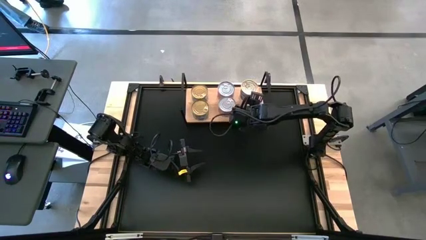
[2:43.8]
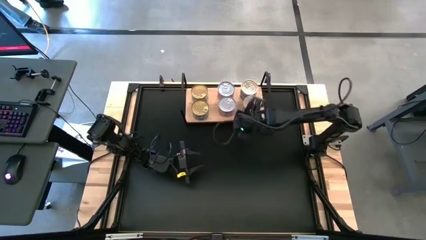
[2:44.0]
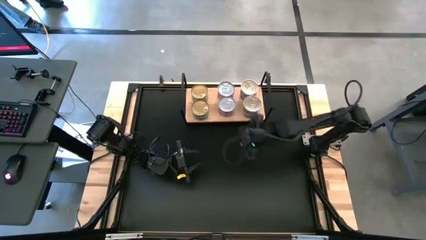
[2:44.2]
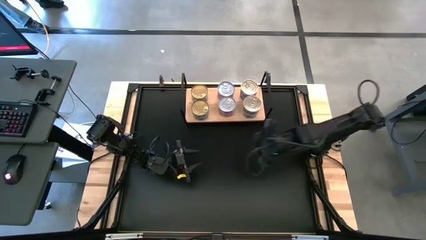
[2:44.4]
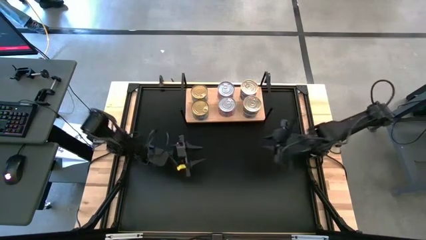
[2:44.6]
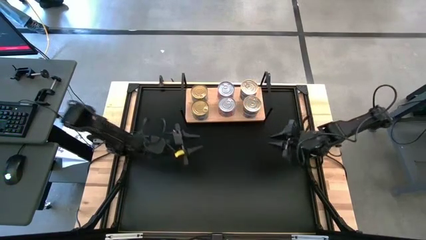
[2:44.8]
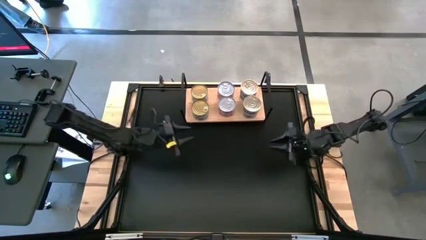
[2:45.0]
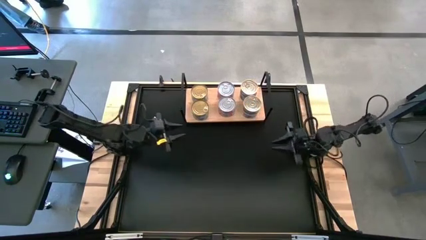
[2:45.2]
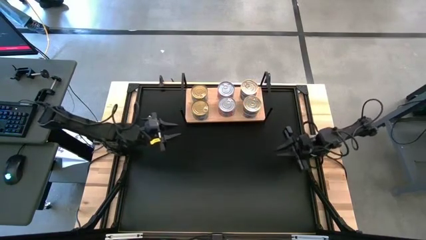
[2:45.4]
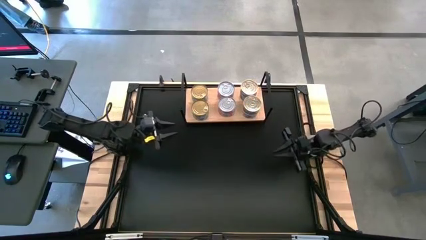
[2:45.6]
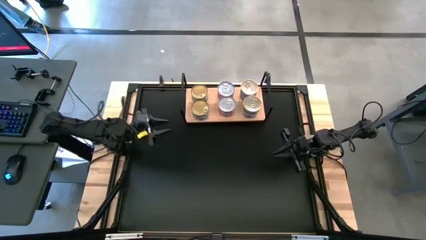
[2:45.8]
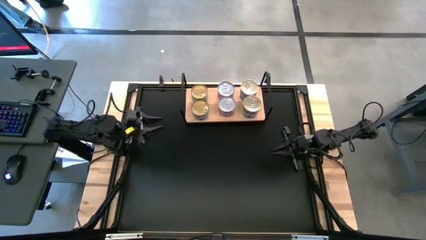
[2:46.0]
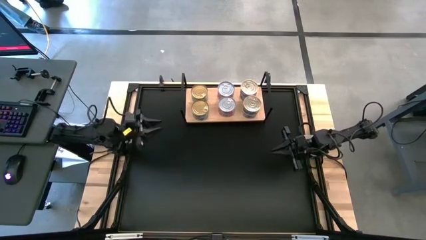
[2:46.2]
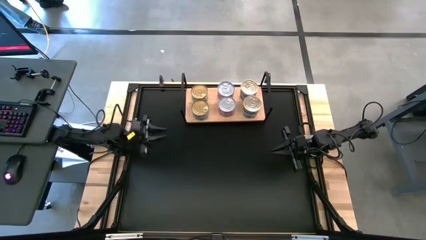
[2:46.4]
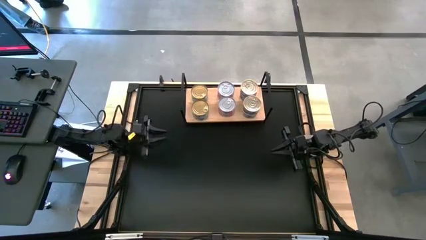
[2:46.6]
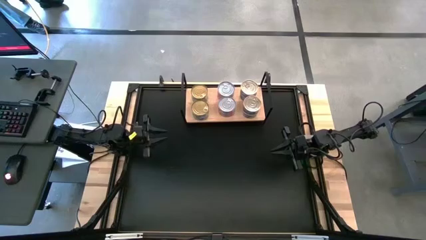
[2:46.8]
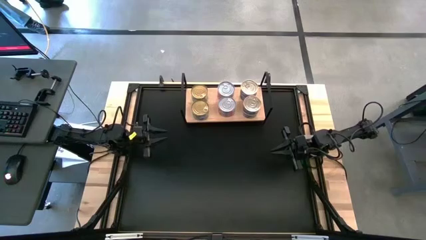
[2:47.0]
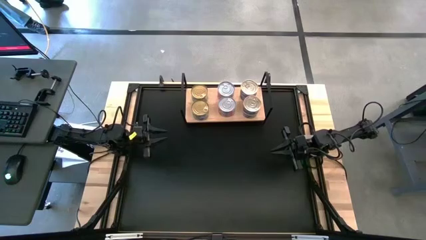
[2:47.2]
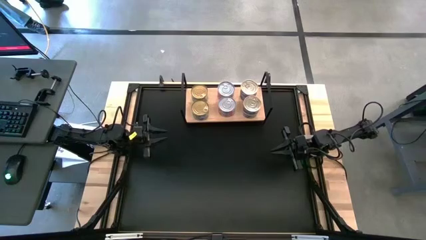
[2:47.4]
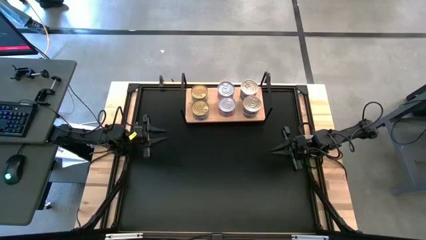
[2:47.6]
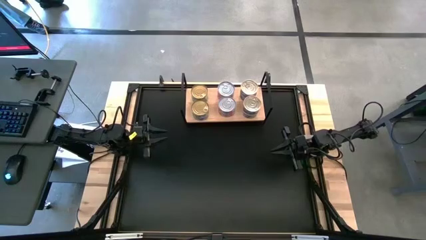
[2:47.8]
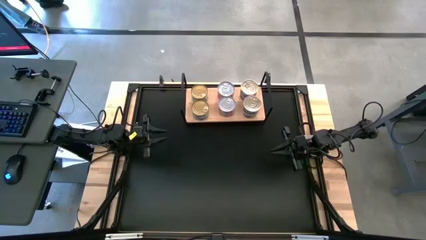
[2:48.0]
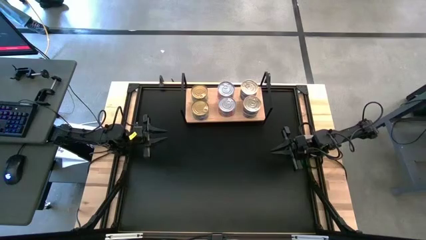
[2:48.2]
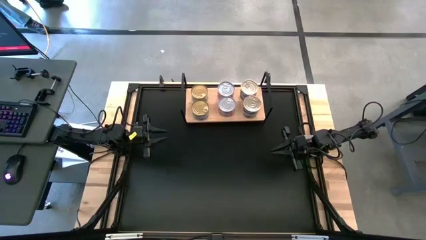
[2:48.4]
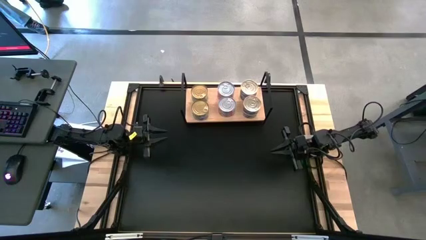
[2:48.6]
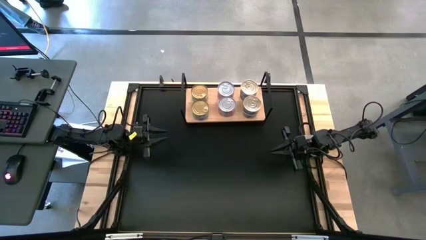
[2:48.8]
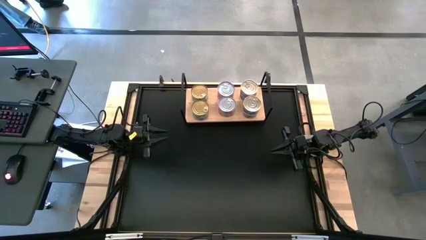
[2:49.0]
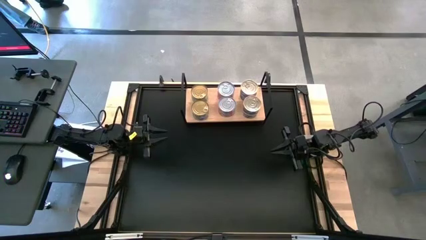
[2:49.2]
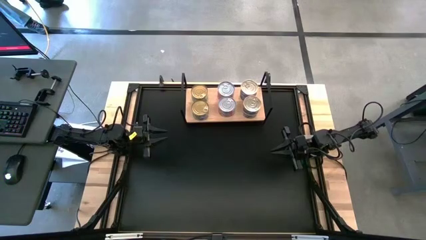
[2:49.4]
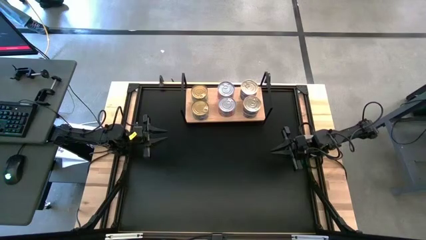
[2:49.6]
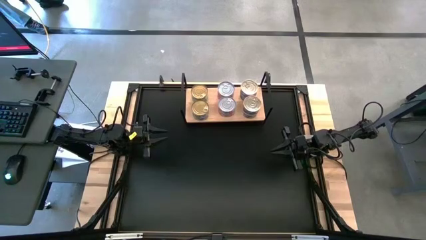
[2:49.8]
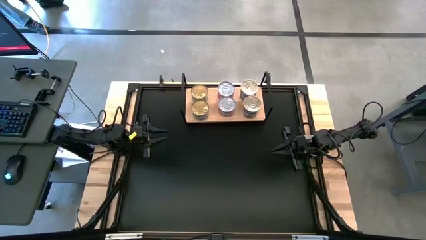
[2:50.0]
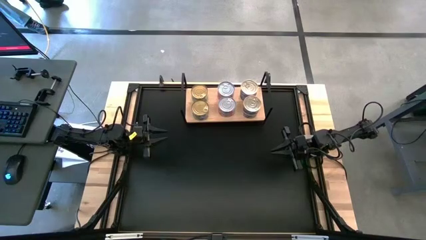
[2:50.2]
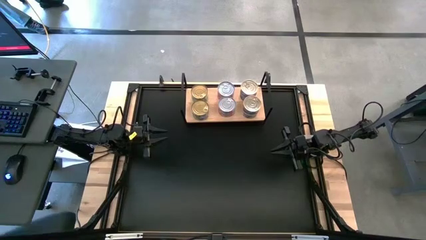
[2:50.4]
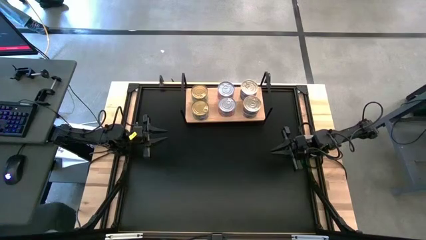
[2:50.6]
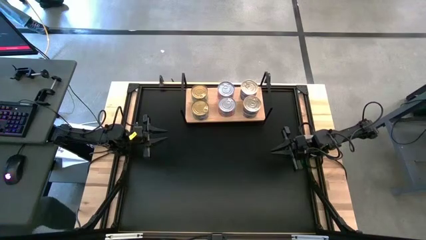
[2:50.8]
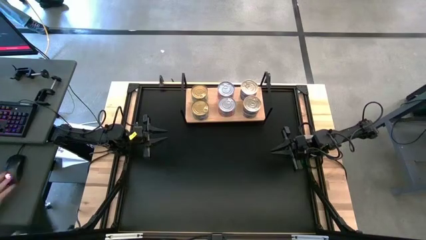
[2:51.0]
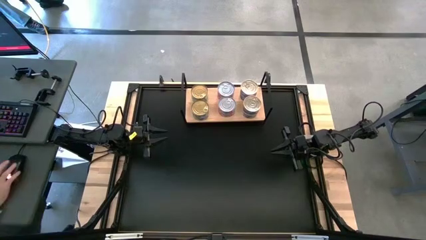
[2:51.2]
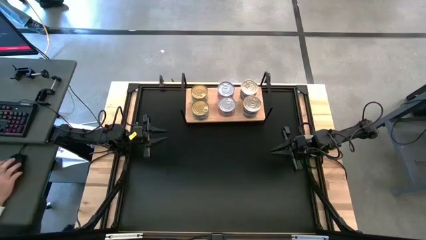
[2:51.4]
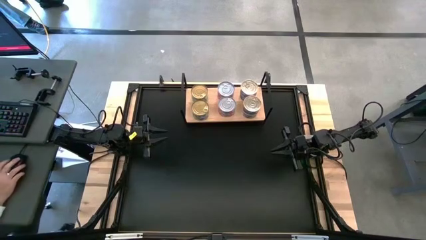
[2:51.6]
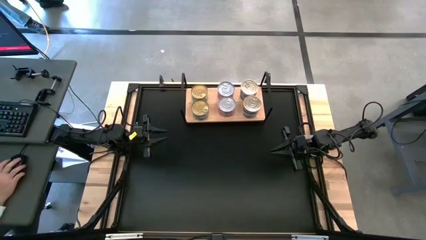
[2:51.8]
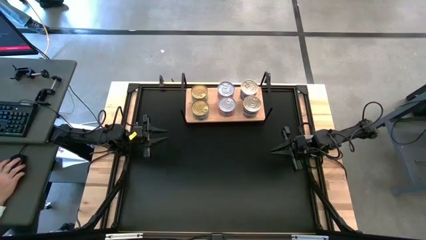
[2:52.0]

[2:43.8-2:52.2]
Task: Stack canned seafood by type on shelf
Return to Home Position
